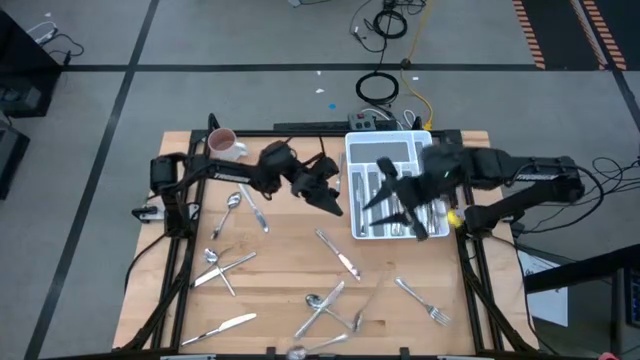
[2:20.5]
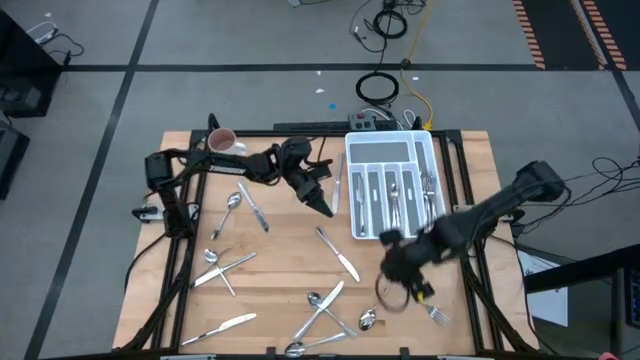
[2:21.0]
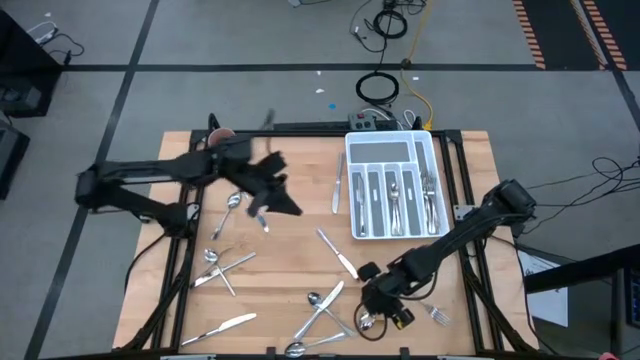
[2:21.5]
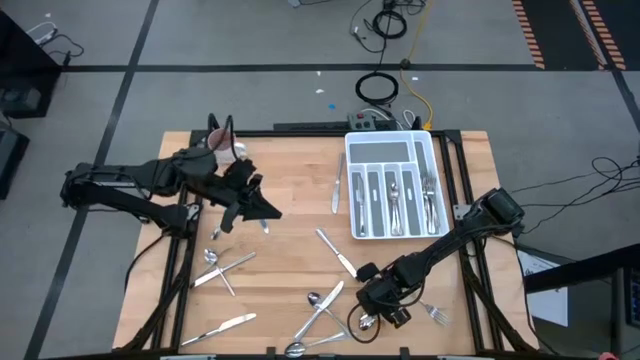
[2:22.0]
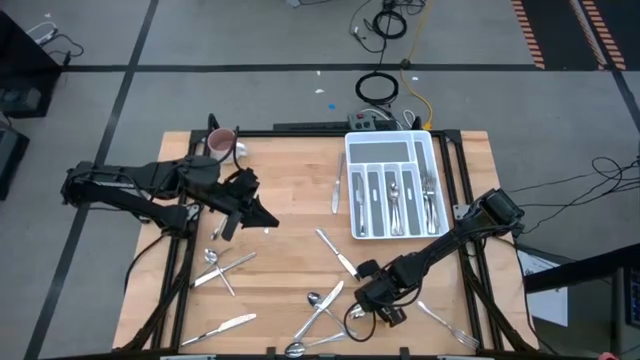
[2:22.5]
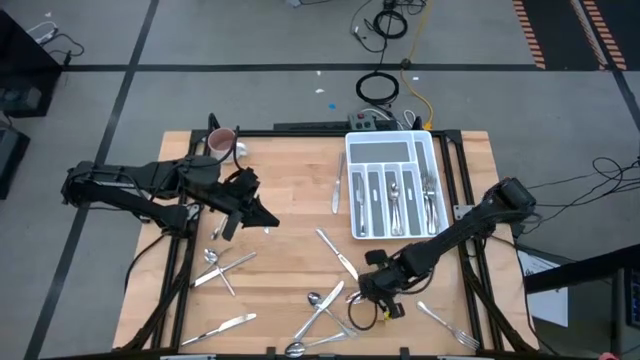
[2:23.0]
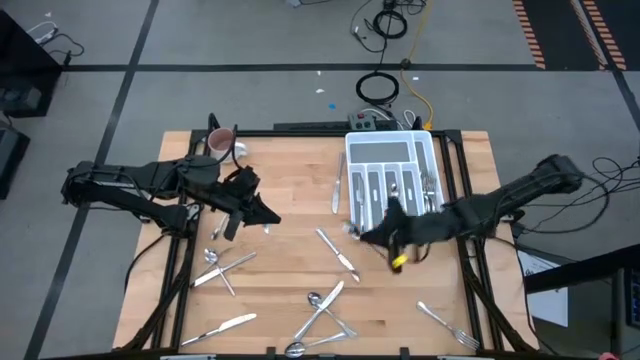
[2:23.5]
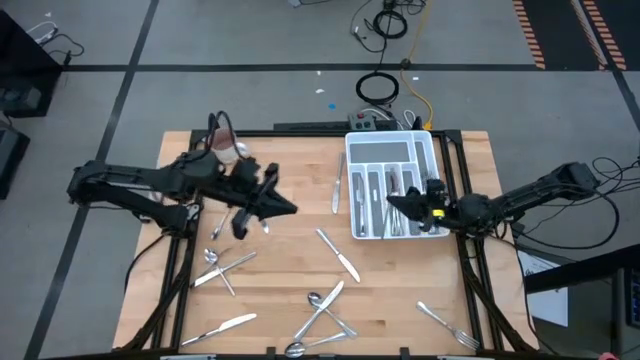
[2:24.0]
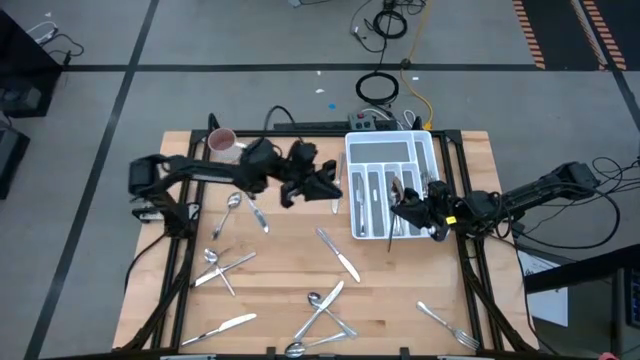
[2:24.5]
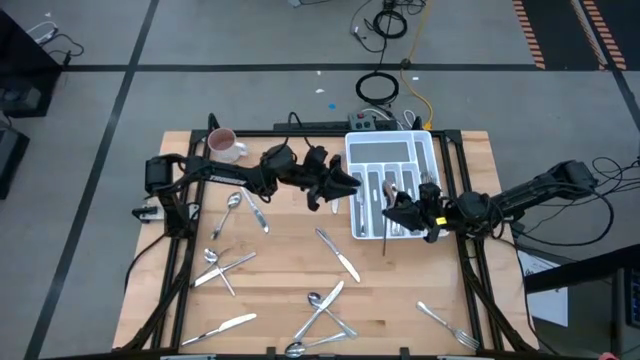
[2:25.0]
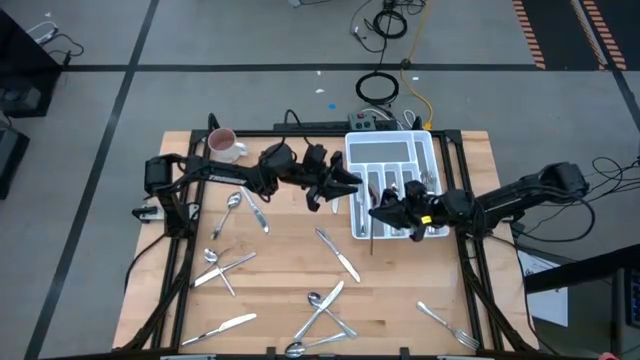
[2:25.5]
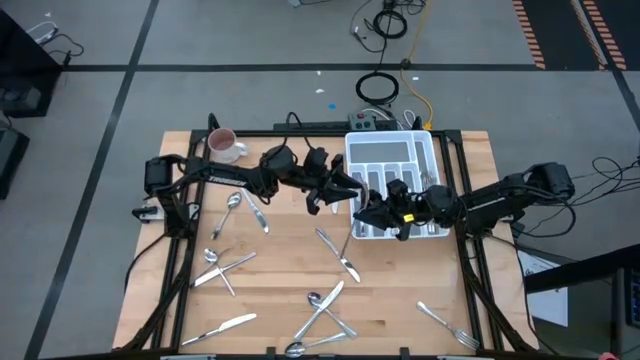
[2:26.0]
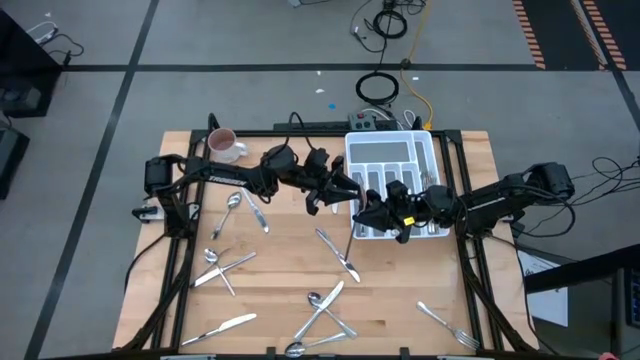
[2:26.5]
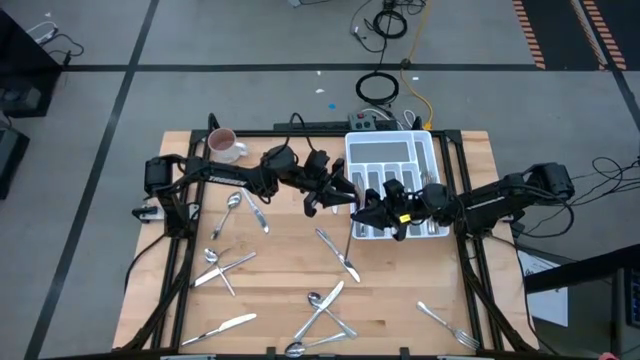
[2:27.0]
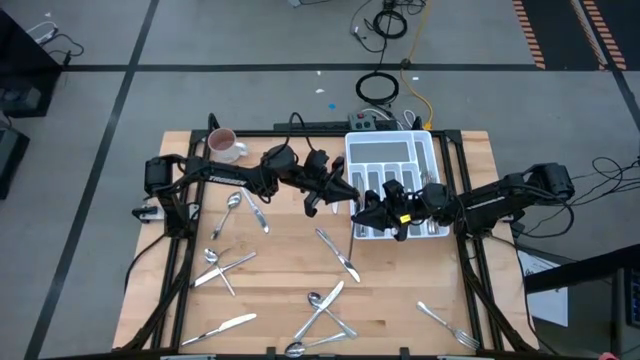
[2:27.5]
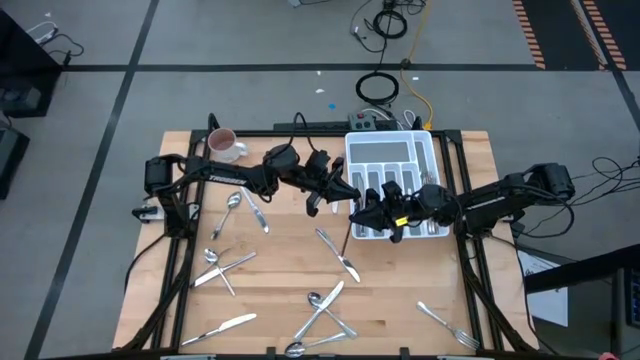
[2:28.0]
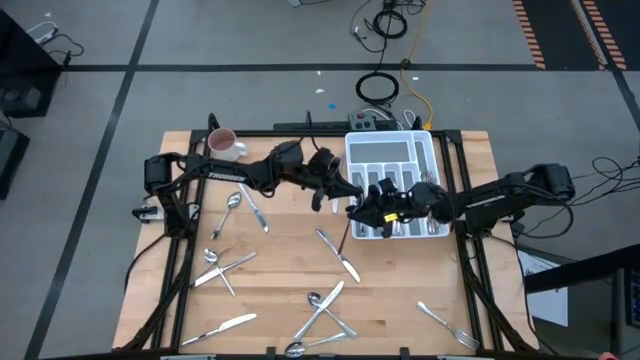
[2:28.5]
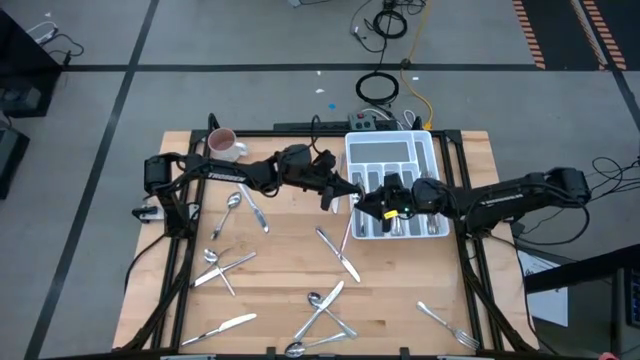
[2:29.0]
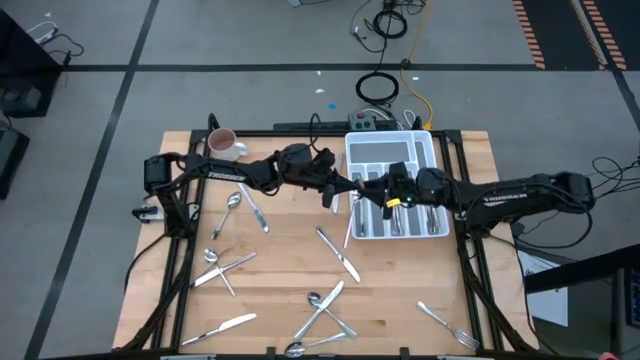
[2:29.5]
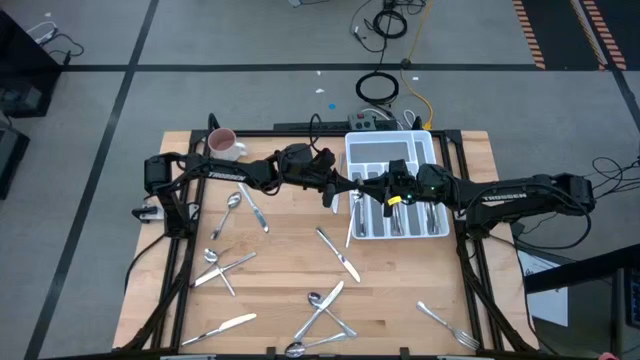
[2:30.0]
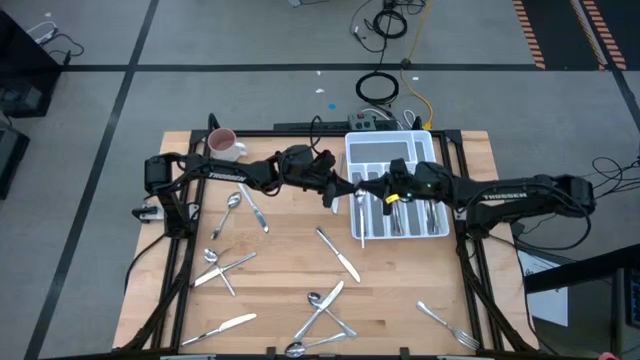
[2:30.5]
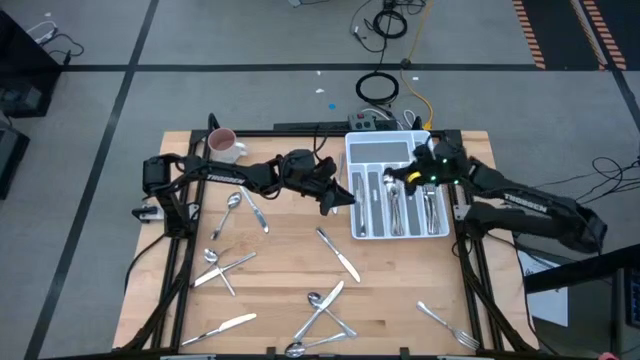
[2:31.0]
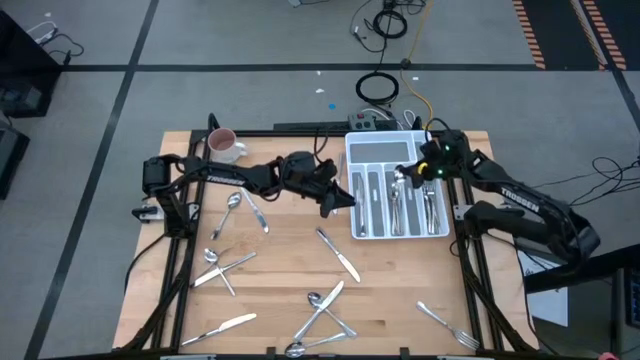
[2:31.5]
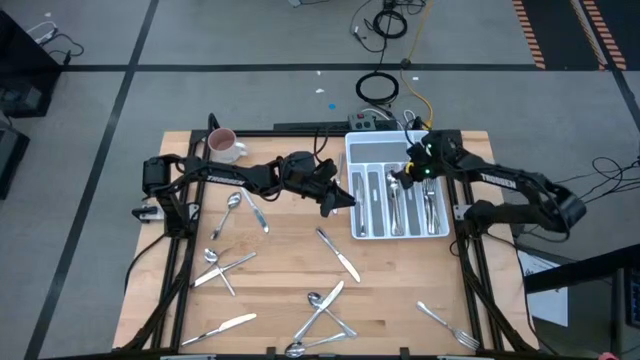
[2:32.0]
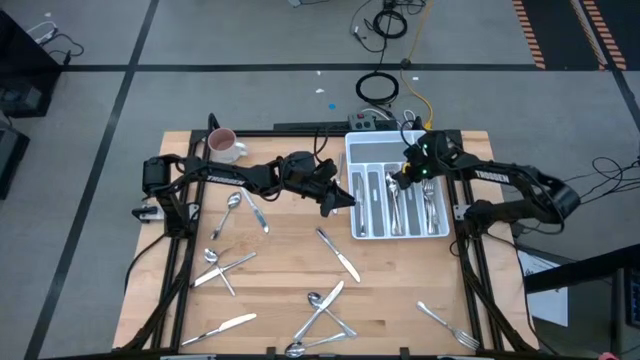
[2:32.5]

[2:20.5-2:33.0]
Task: Sort silverware
Put the spoon in the middle section of the silverware tray

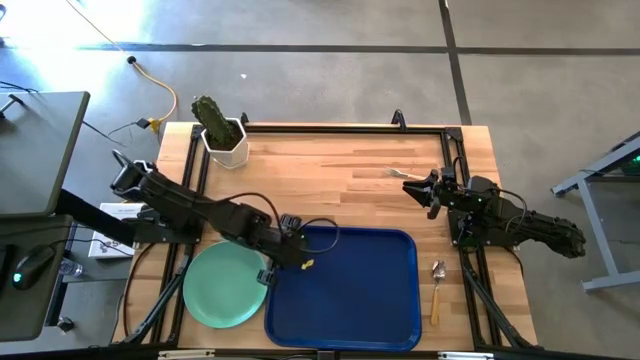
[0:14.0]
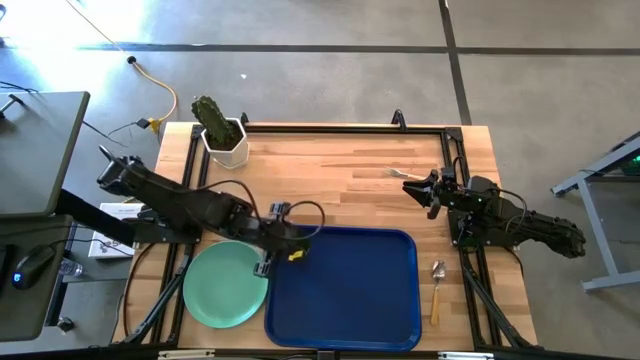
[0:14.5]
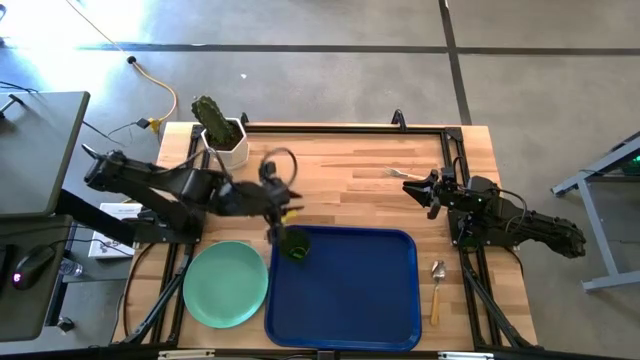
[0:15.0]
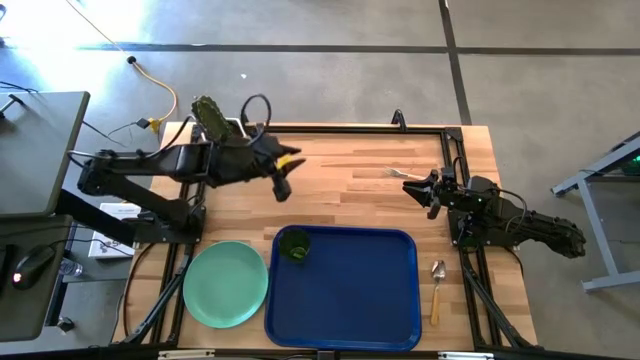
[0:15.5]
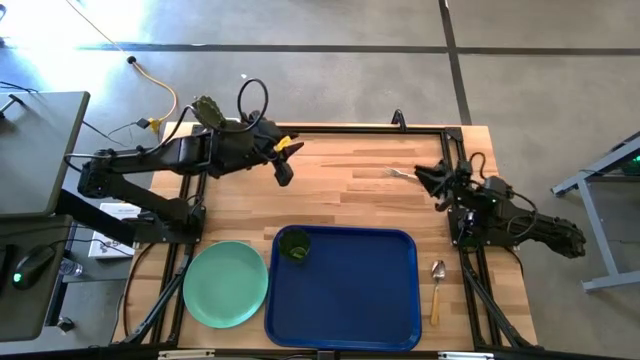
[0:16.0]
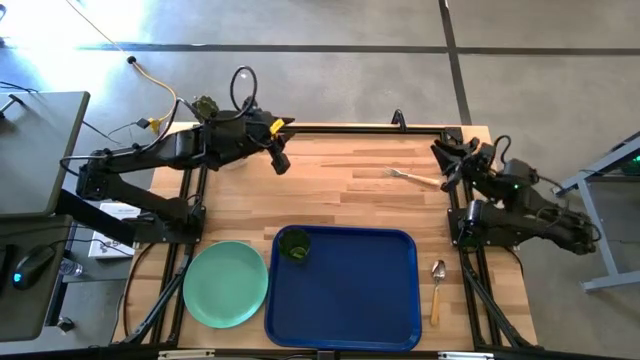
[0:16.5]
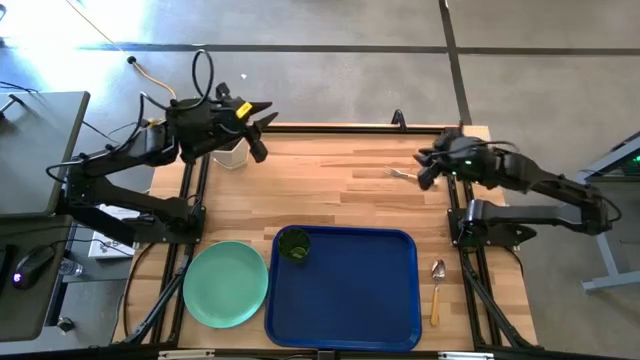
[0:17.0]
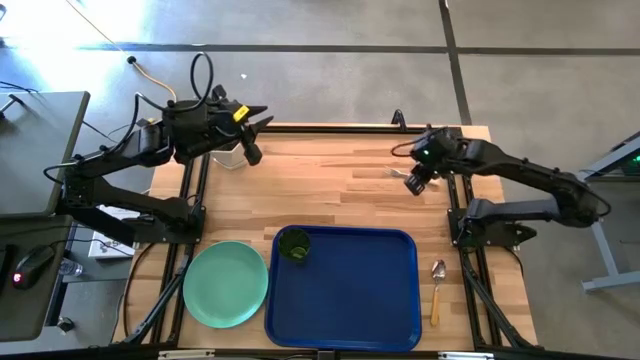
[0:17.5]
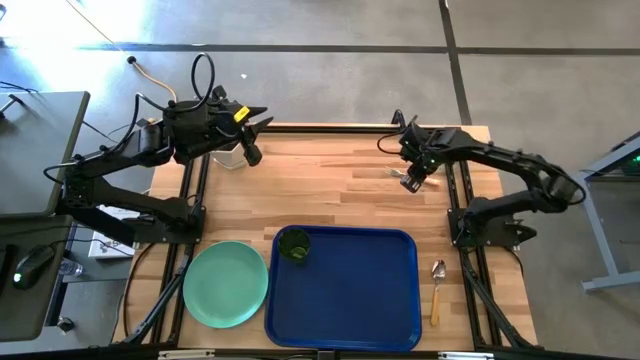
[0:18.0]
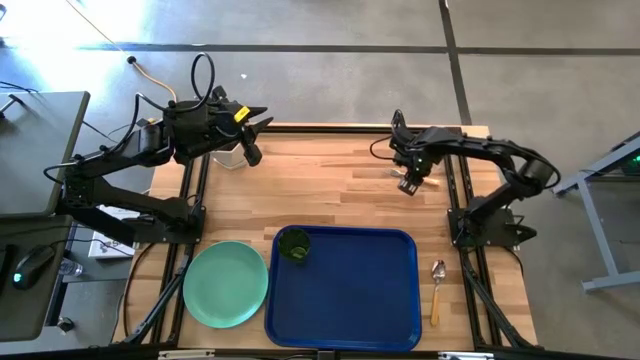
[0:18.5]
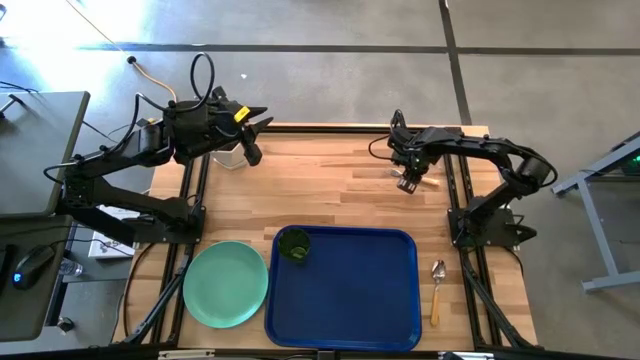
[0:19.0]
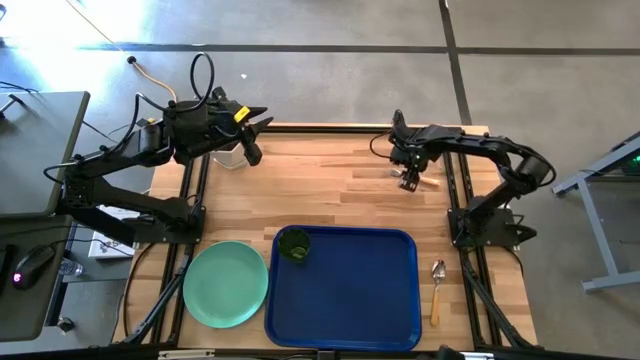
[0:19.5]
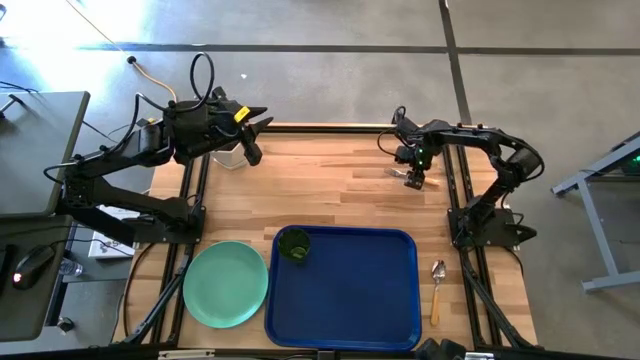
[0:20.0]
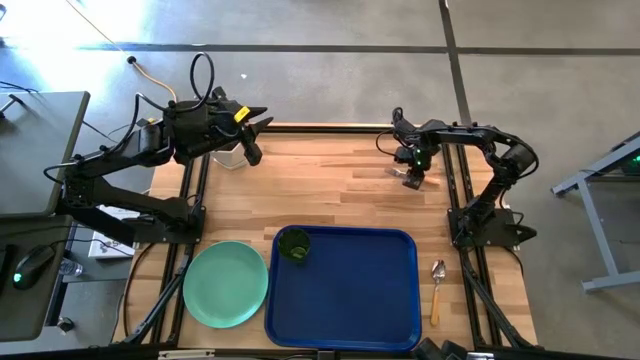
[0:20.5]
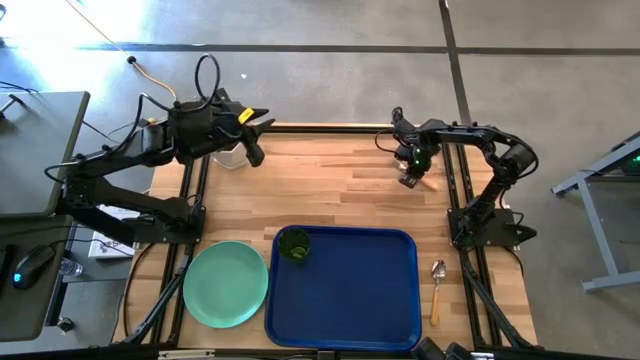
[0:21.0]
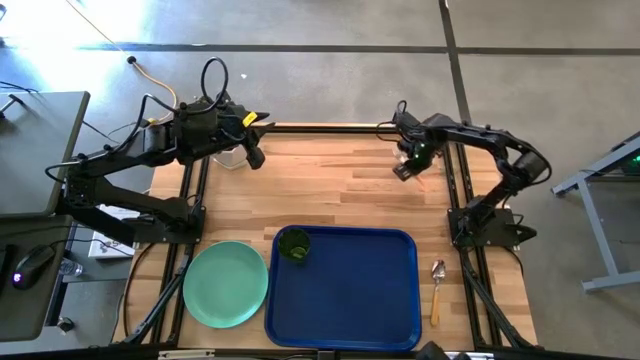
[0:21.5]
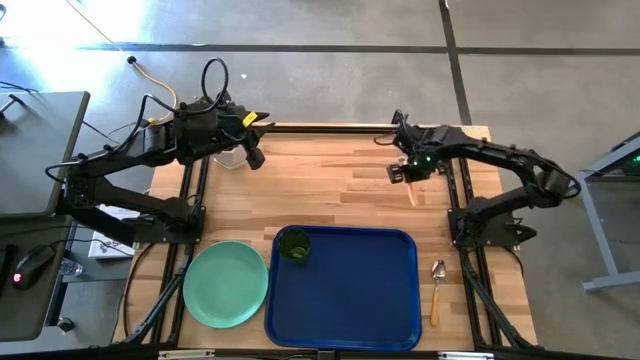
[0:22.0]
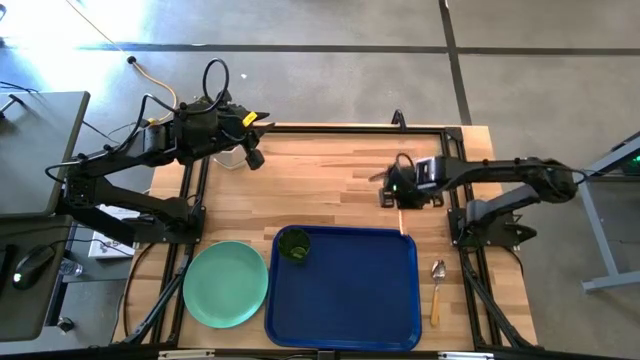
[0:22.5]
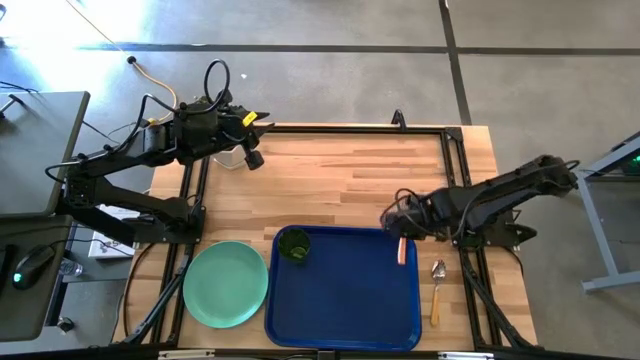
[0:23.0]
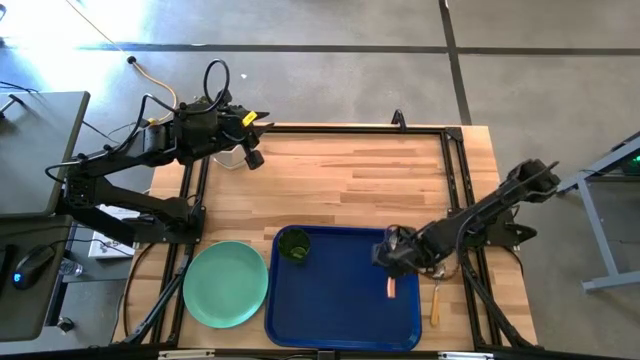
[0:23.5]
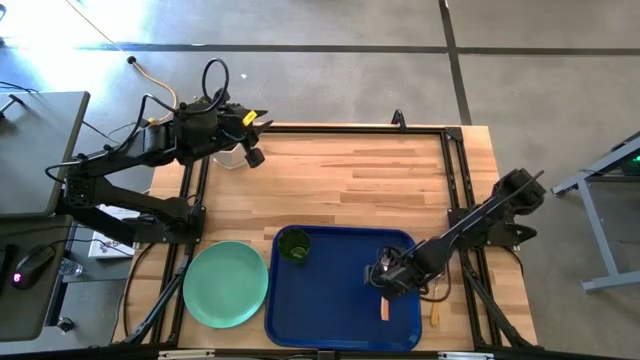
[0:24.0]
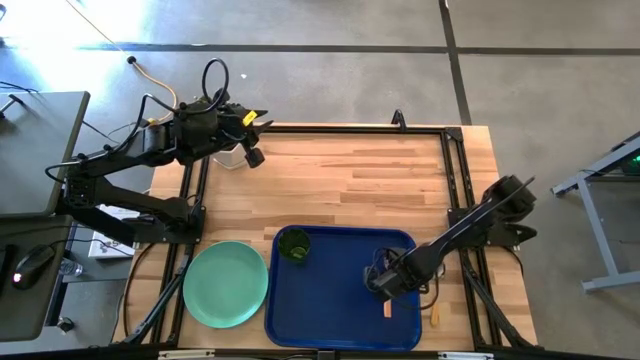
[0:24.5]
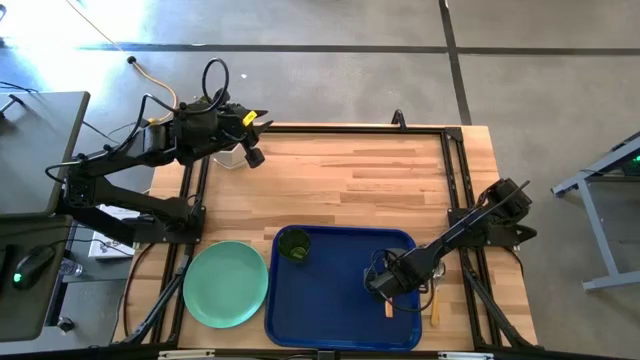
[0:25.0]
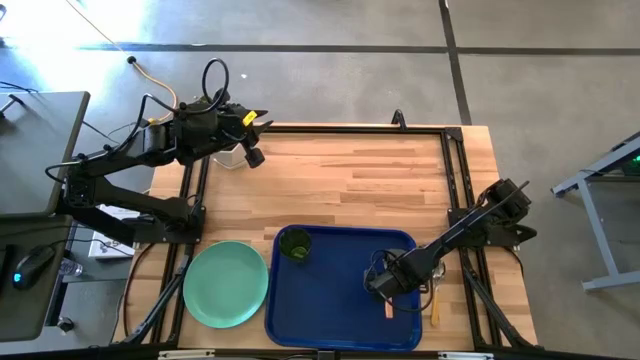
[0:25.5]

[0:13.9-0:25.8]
Task: Pick and place plate/cup/fork/spoon on tray
Put the orange fork to the right of the green glass on the blue tray
